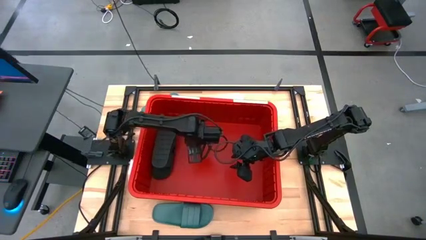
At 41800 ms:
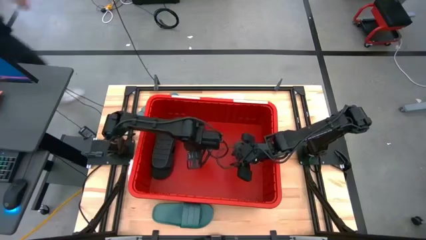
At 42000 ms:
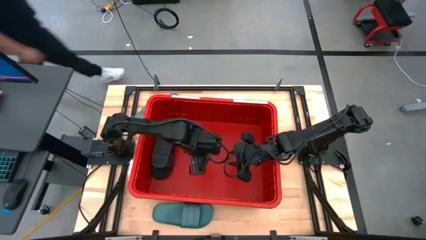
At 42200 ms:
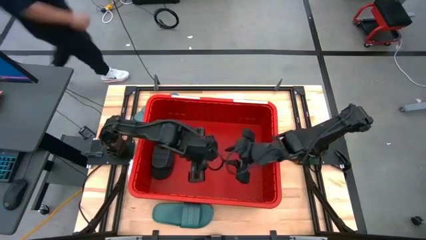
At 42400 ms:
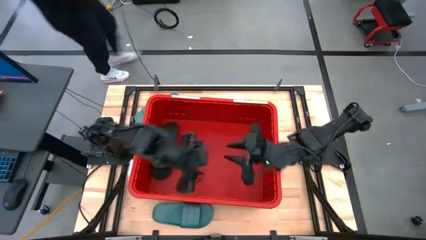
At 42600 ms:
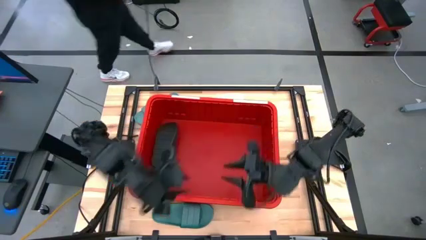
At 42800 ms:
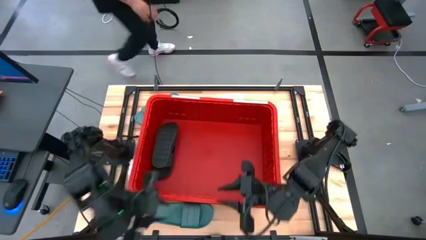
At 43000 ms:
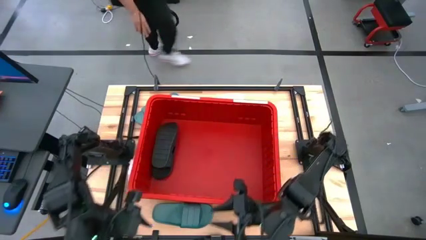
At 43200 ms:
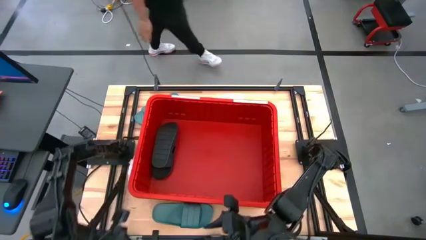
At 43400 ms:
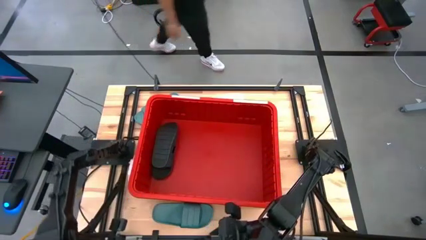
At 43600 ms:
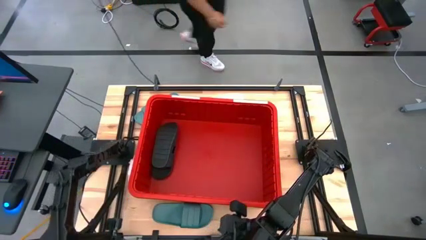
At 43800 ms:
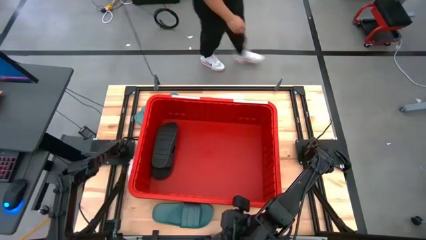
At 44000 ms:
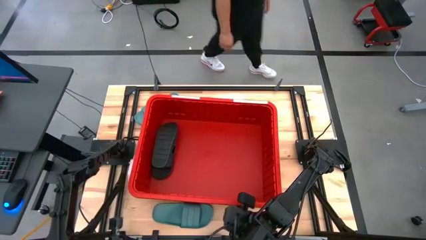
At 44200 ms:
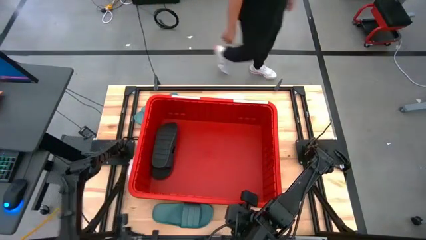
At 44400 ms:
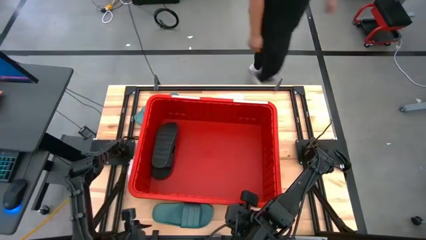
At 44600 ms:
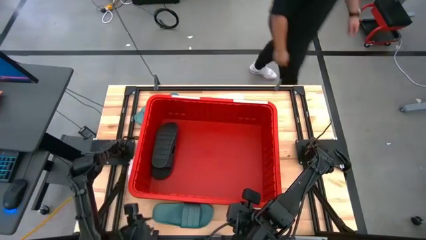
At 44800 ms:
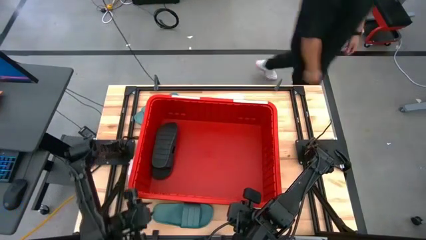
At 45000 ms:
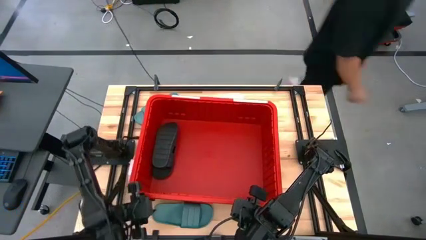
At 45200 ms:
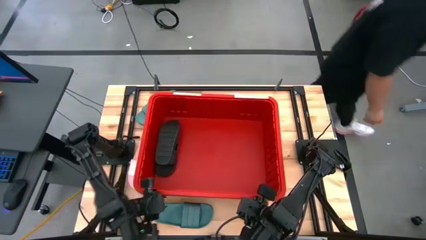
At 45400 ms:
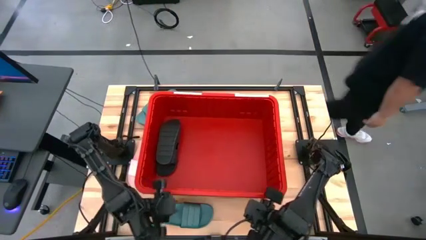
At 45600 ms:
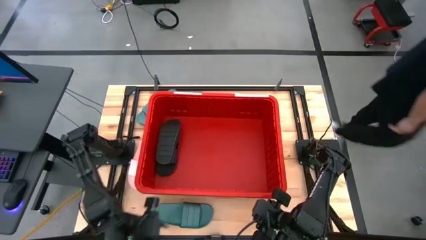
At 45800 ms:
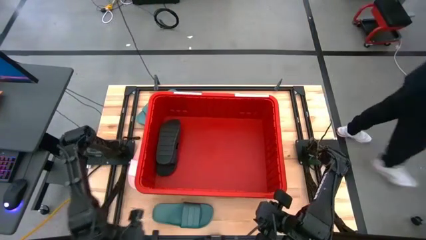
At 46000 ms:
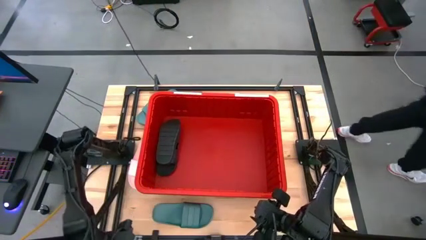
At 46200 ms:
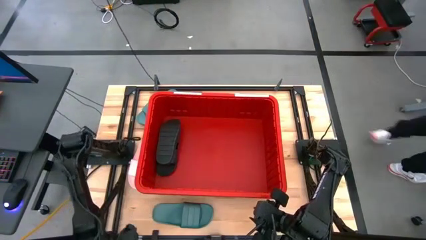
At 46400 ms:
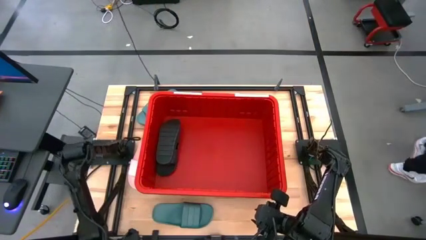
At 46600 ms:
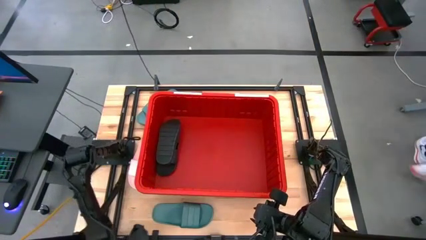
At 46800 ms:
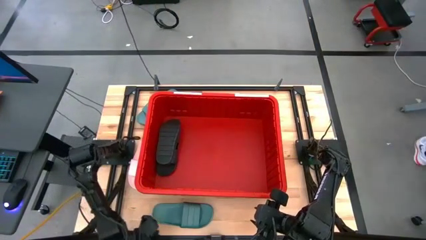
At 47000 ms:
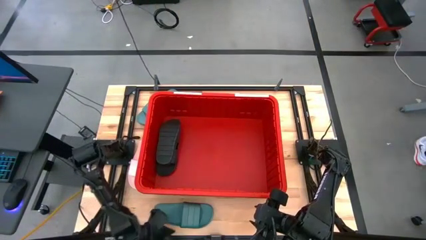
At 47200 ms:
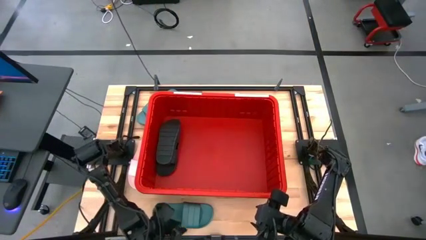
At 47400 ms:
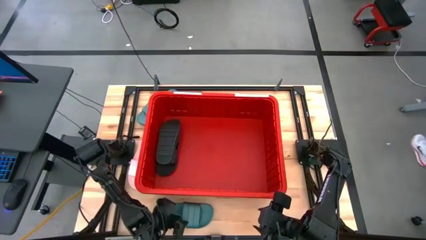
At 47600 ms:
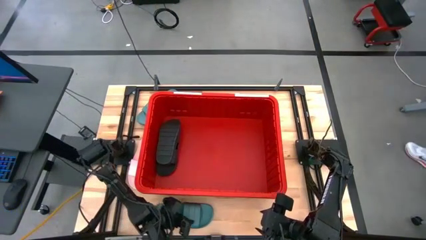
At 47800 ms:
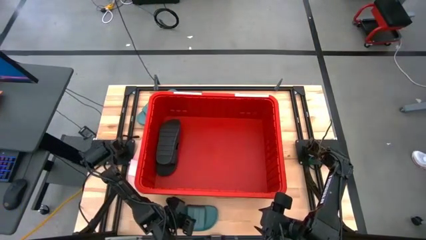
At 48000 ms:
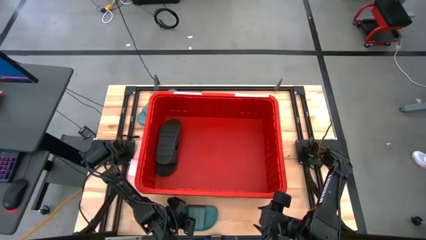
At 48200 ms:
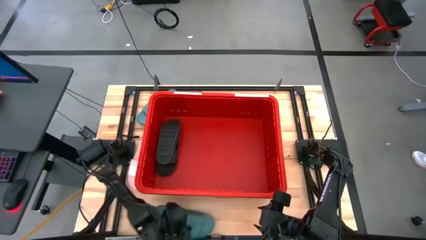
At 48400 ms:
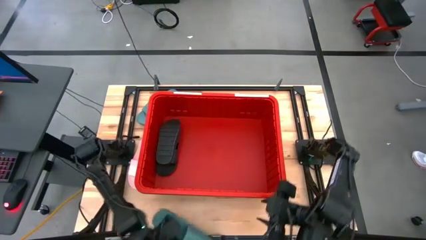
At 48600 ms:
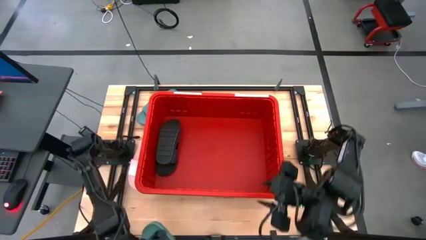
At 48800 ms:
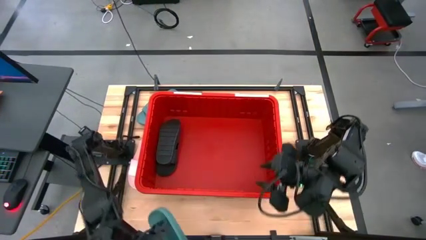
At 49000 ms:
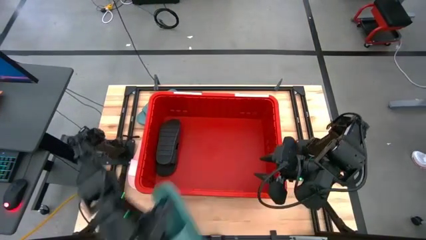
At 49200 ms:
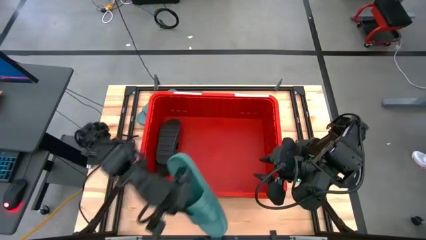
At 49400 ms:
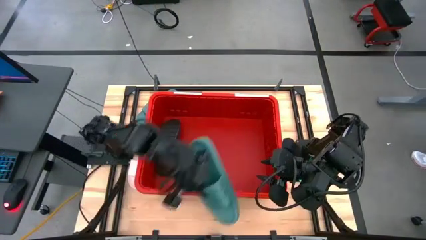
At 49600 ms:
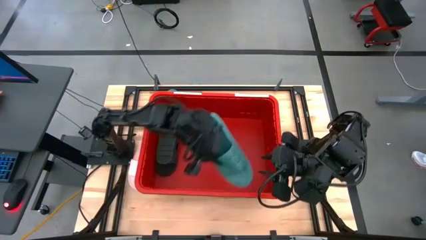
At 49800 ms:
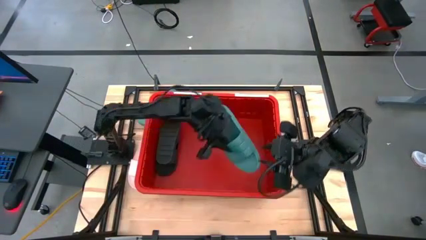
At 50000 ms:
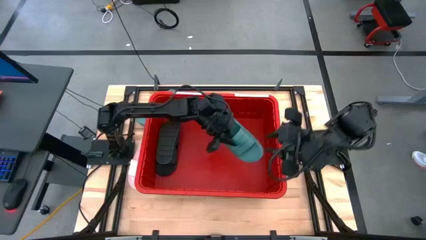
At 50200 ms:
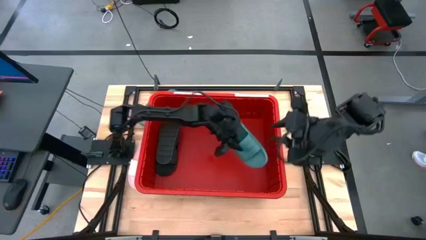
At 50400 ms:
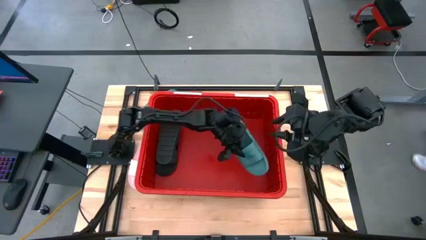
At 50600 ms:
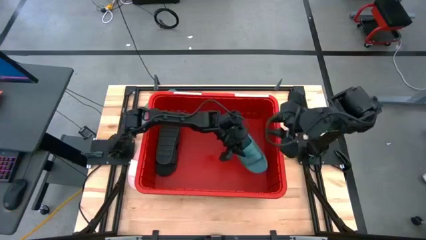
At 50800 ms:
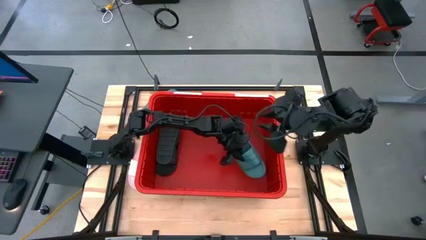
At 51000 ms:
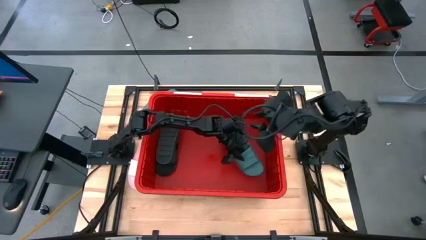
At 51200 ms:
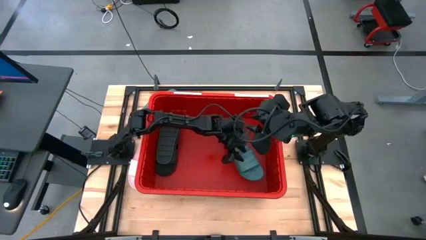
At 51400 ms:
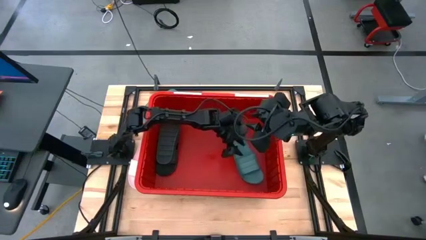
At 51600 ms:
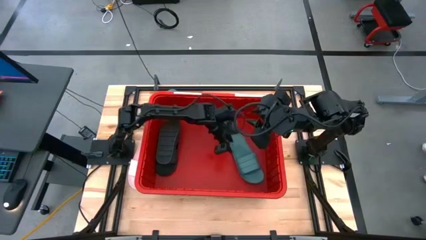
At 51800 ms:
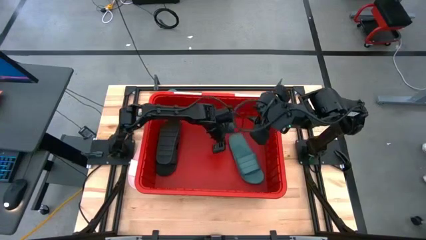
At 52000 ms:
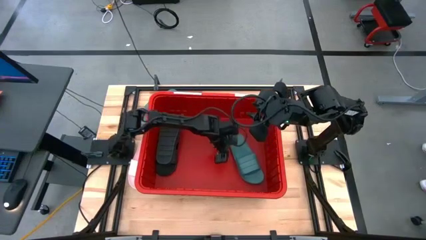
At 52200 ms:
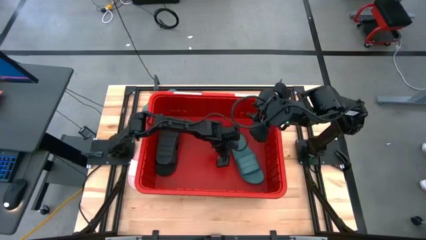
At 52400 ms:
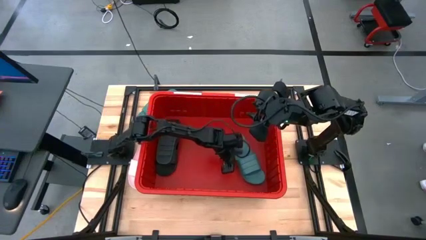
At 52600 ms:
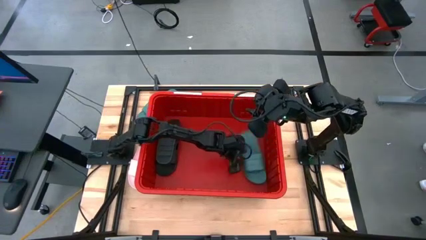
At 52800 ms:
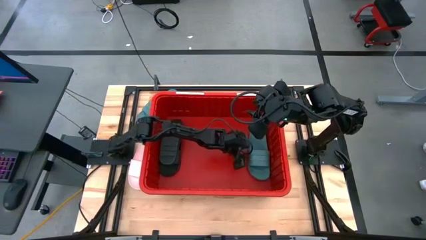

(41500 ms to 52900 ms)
Task: Pick and place slides into bin
Put the bottom green slide into the right side of the container
